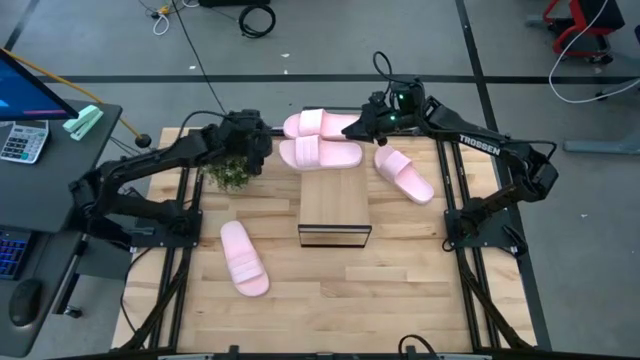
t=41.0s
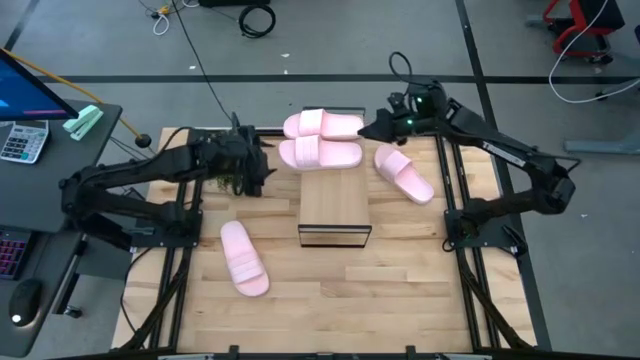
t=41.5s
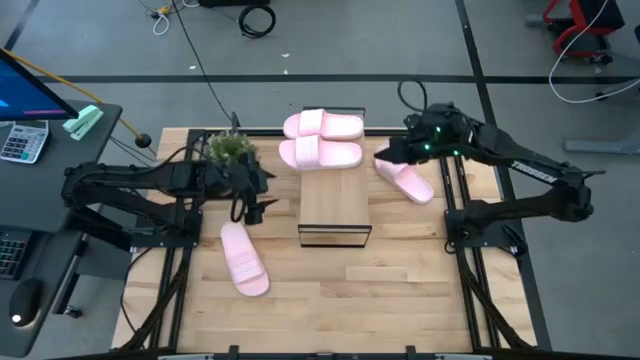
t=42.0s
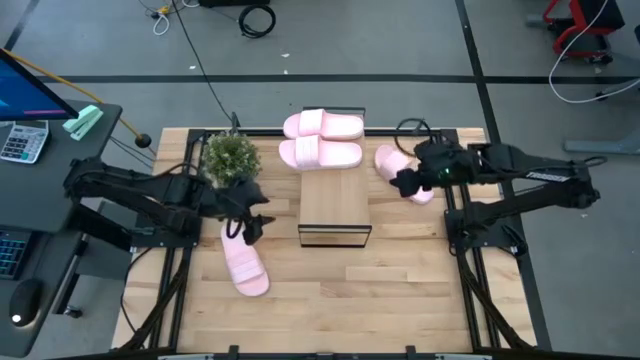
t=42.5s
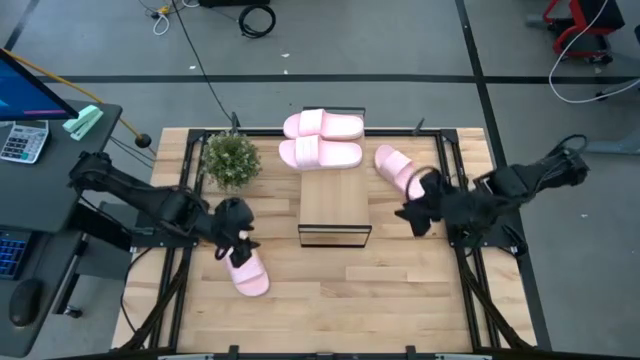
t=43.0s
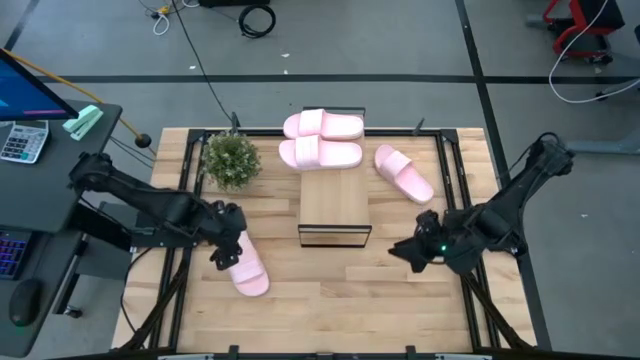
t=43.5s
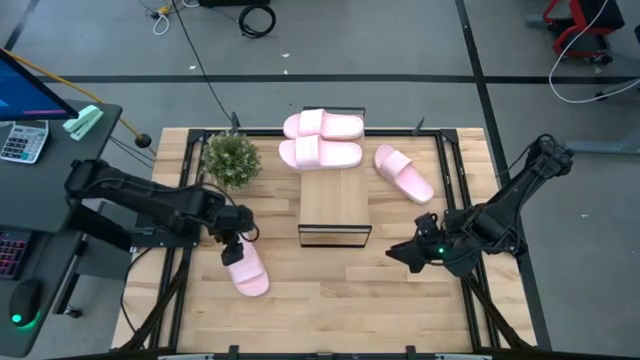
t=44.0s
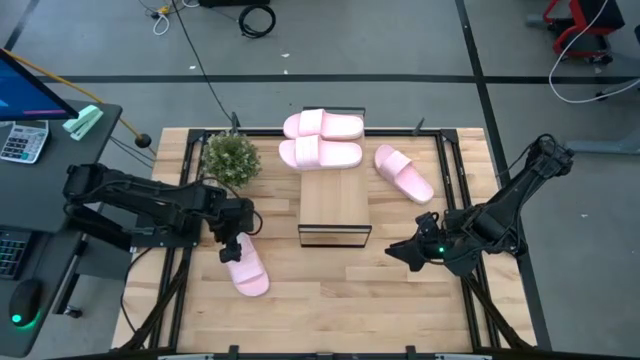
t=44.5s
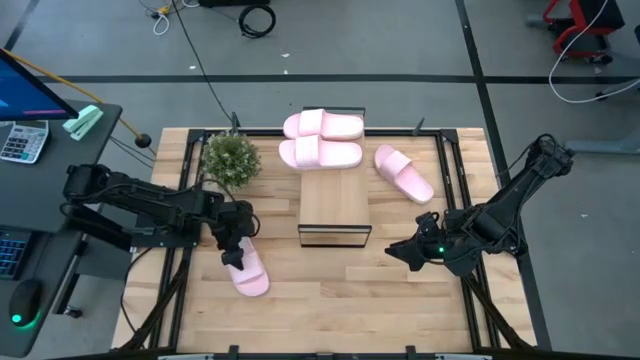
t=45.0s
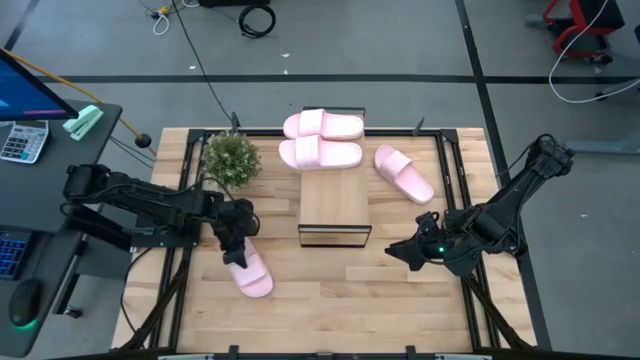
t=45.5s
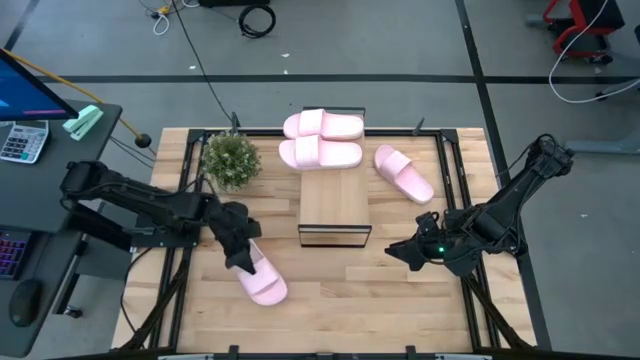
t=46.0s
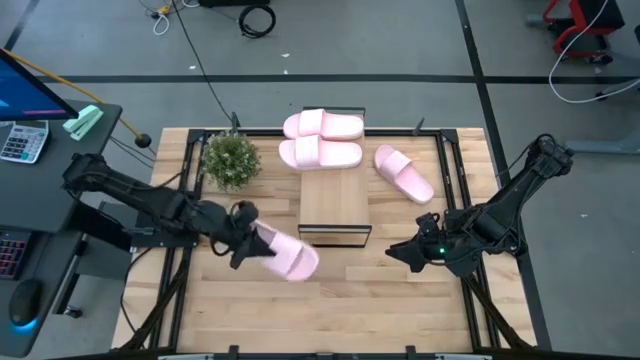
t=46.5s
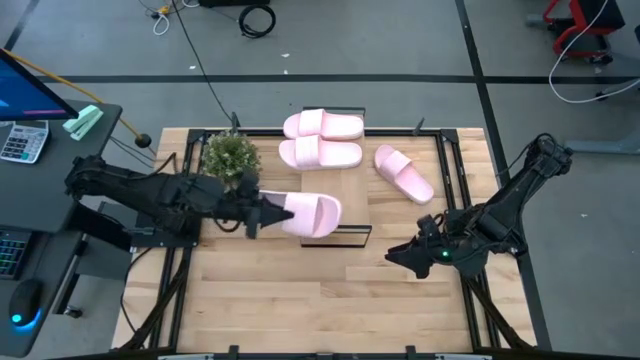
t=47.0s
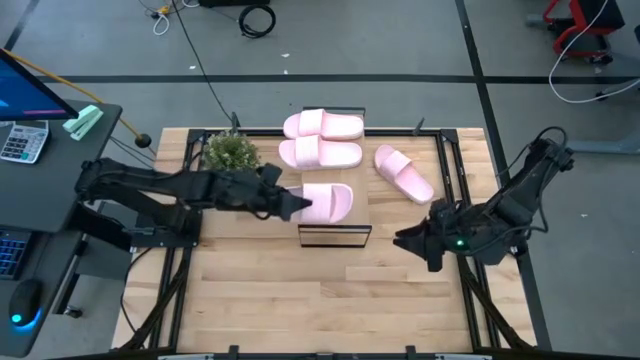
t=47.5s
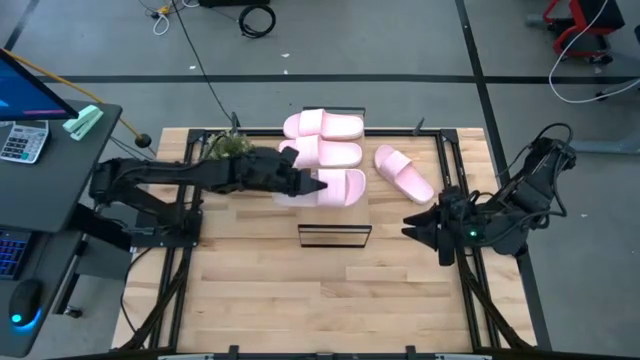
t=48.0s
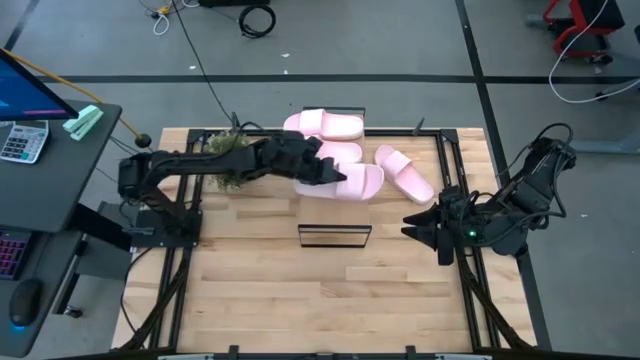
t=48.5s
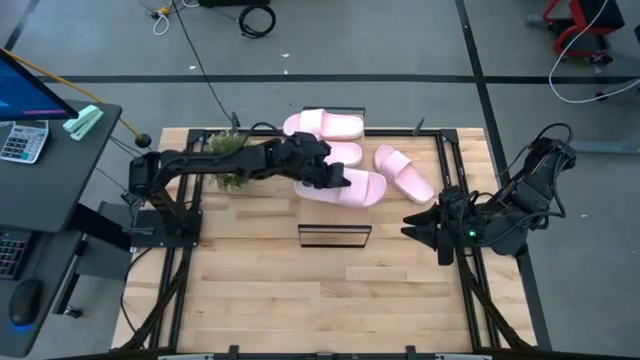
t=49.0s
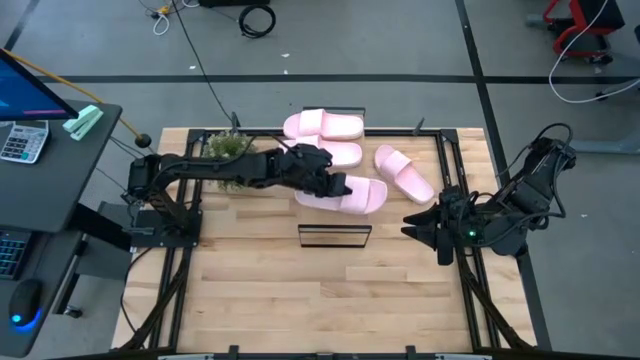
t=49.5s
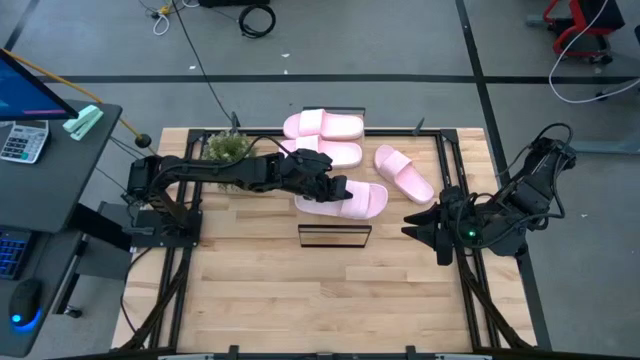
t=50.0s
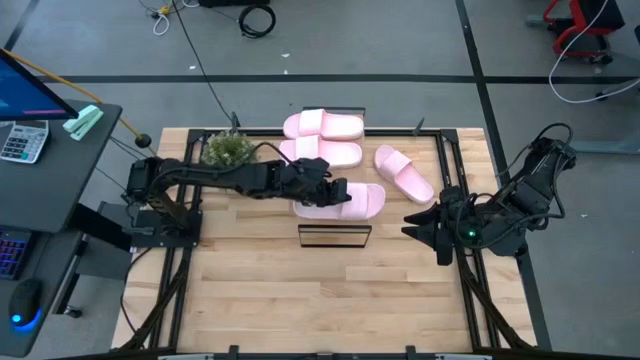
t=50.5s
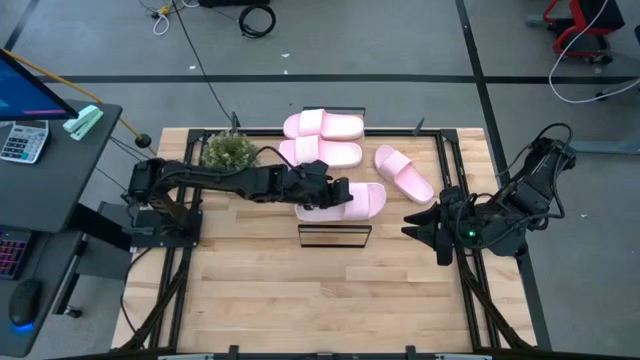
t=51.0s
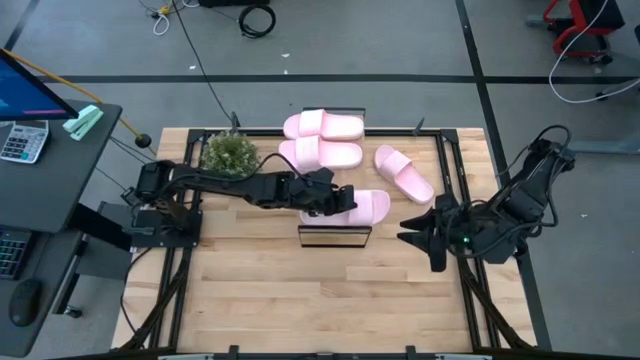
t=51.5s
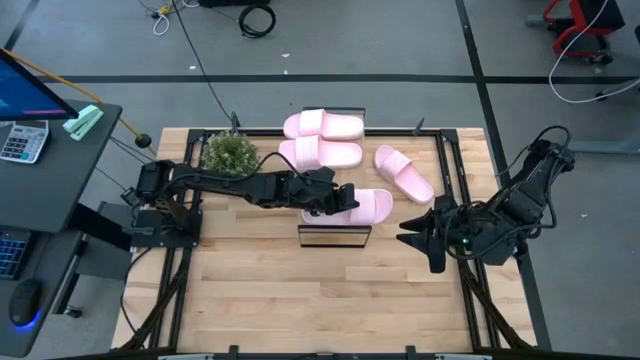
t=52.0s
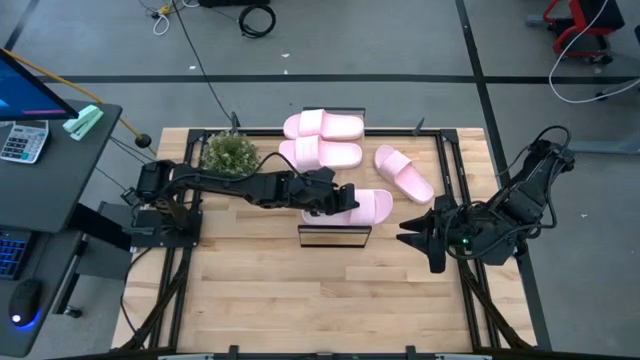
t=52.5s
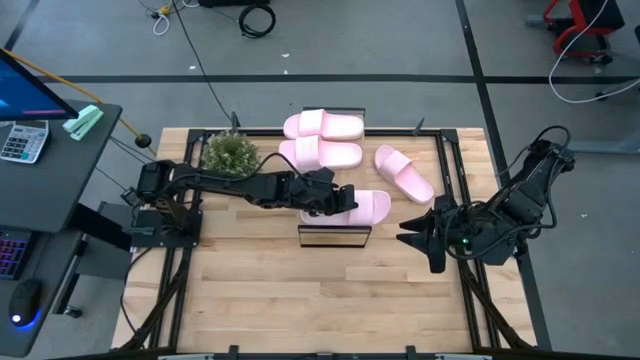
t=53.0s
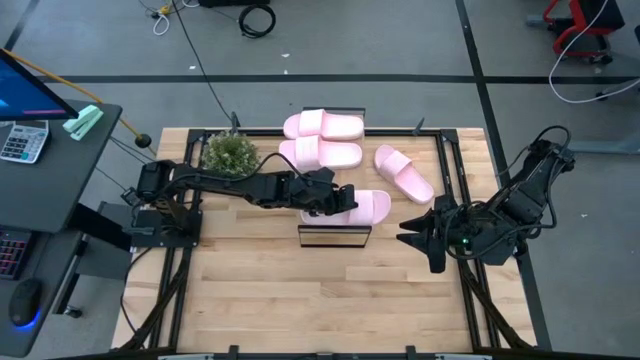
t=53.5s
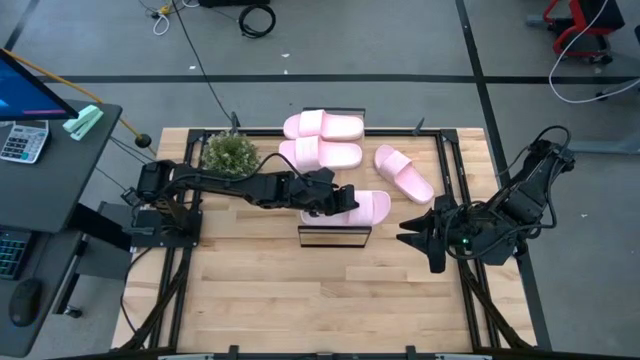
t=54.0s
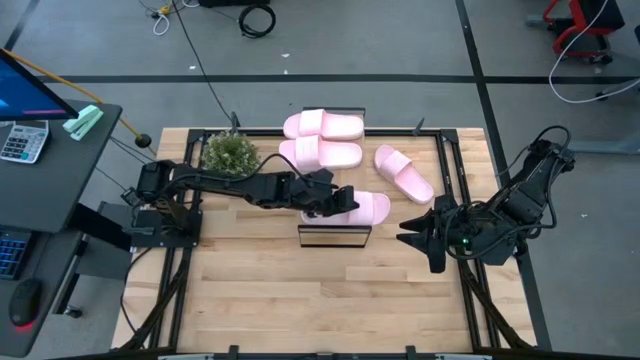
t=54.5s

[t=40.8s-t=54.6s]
Task: Pick and place slides into the shelf
Put the pink slide on the shelf

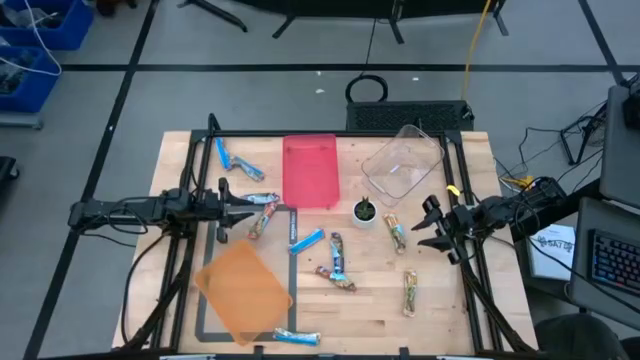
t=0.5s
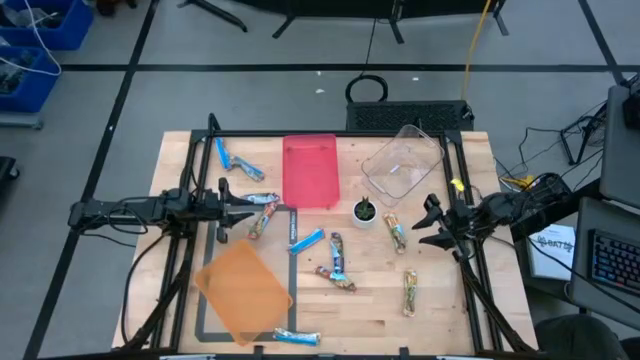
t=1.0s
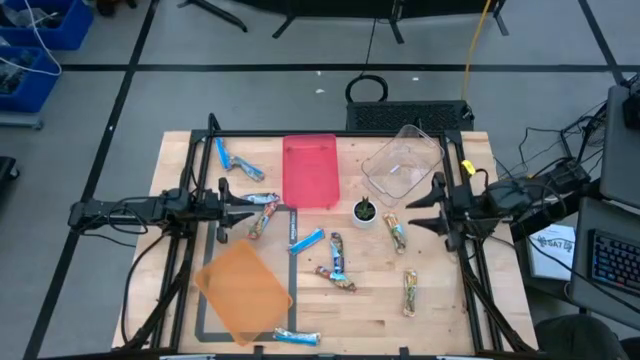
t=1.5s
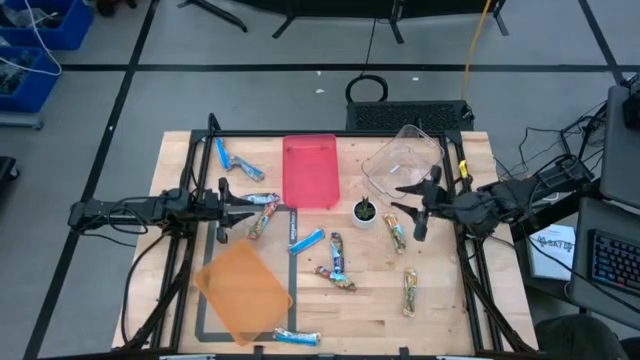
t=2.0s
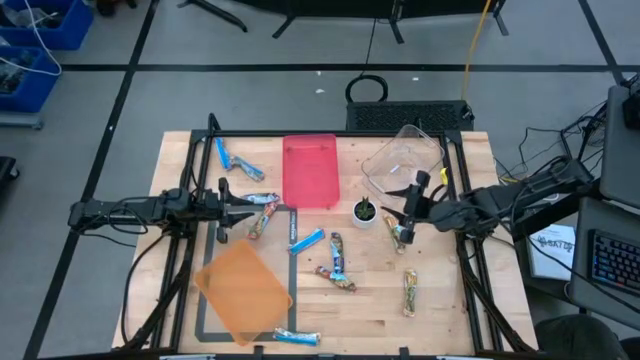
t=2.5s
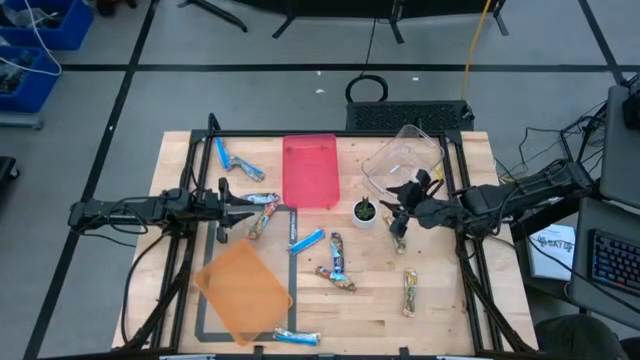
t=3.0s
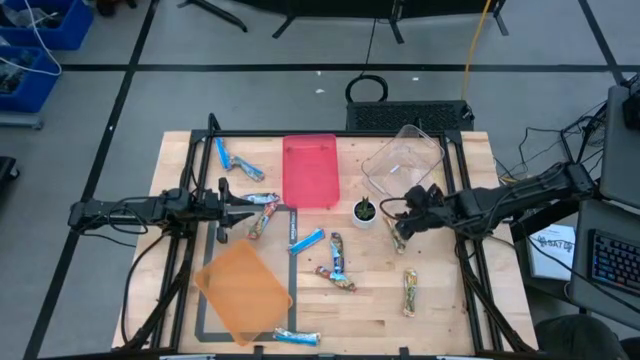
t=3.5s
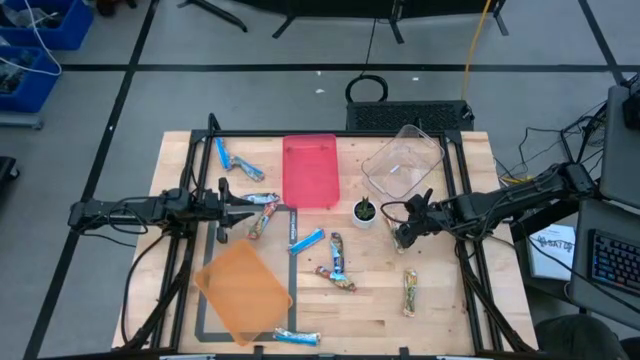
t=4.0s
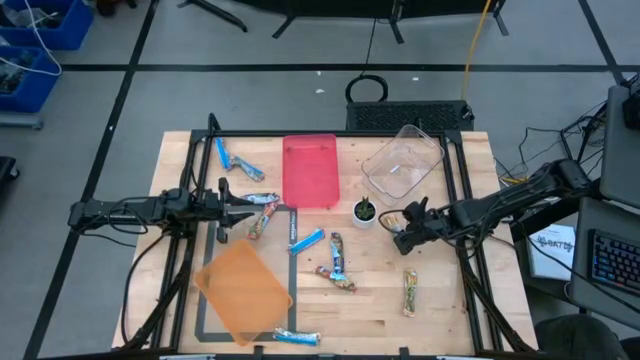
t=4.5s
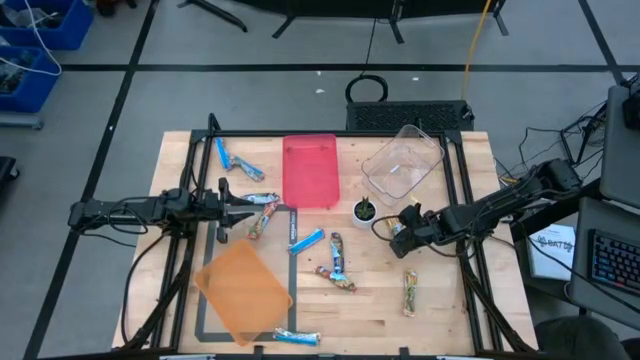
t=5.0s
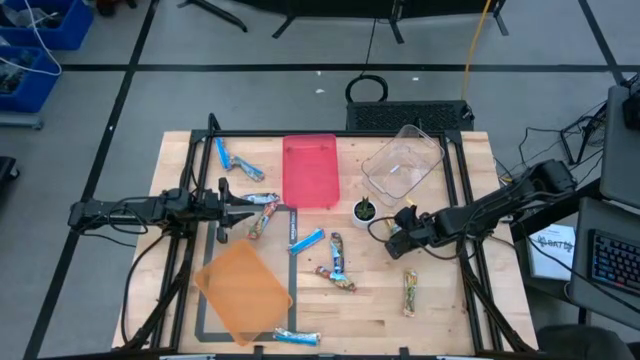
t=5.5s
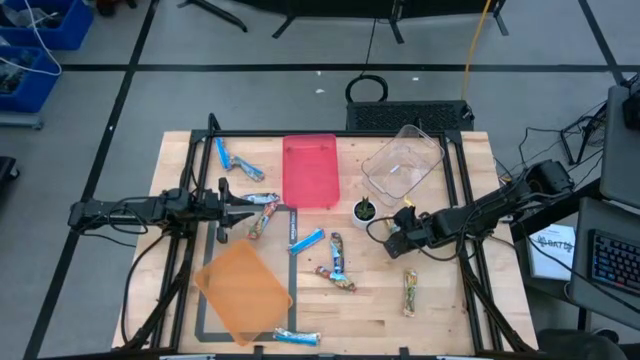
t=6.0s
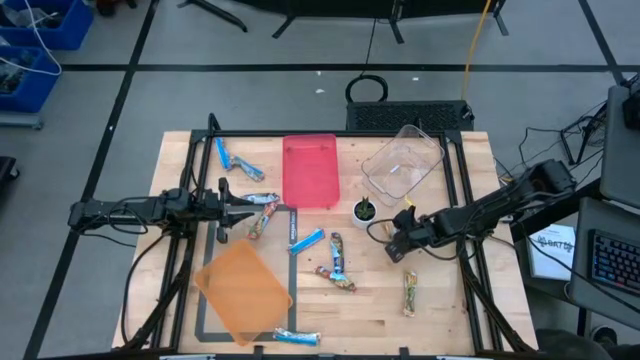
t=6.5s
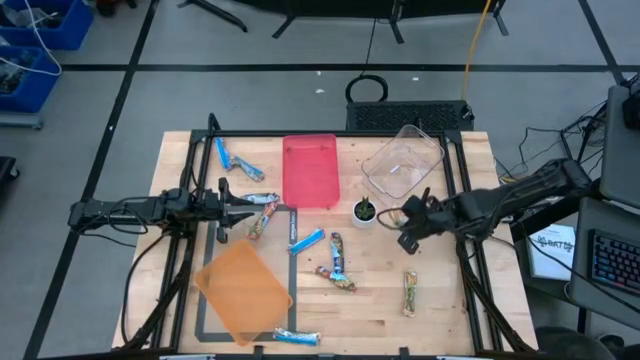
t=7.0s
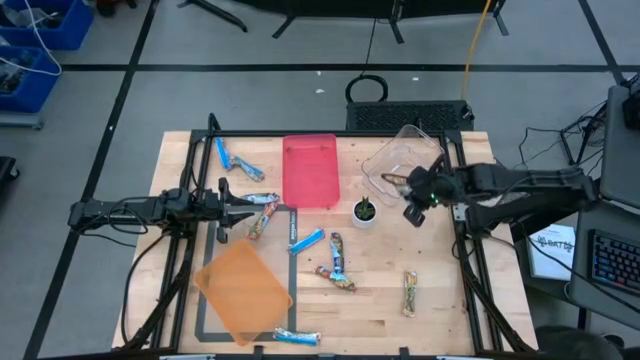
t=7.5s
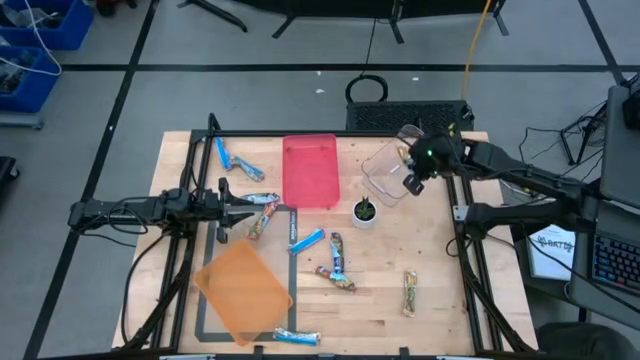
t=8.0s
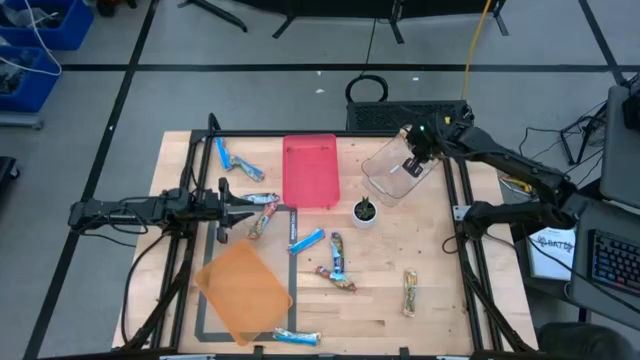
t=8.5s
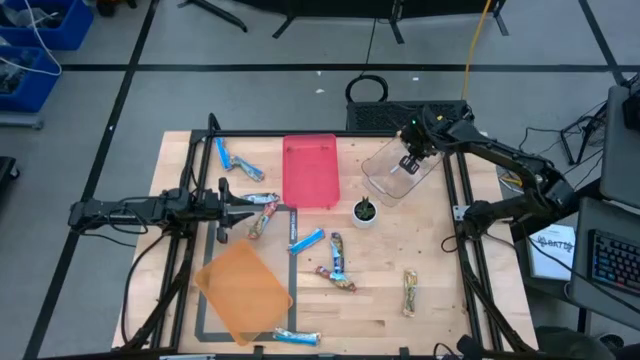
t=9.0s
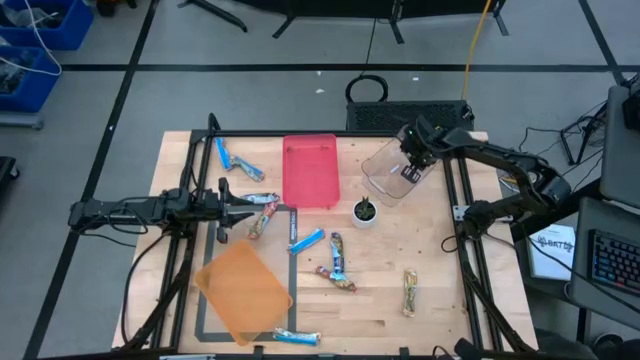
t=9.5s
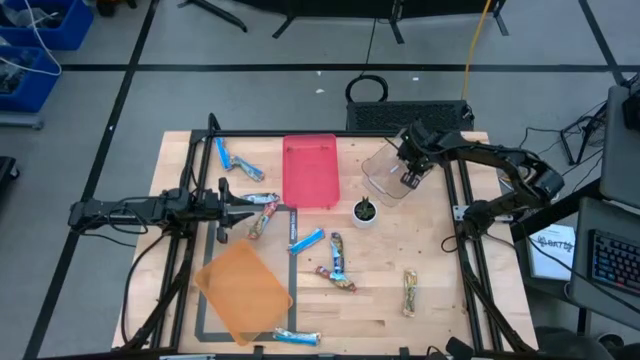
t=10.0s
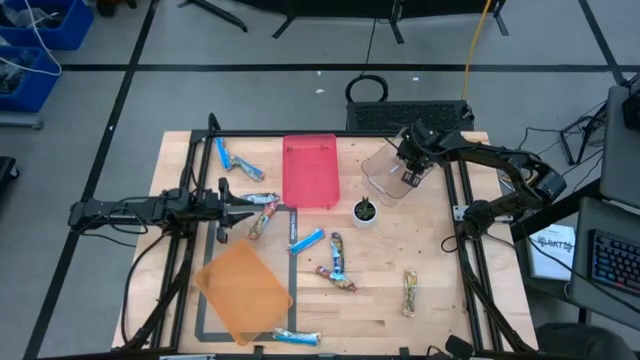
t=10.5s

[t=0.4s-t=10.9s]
Task: Pick and place Granola Bars by type
Put the orange granola bar into the transparent bin
